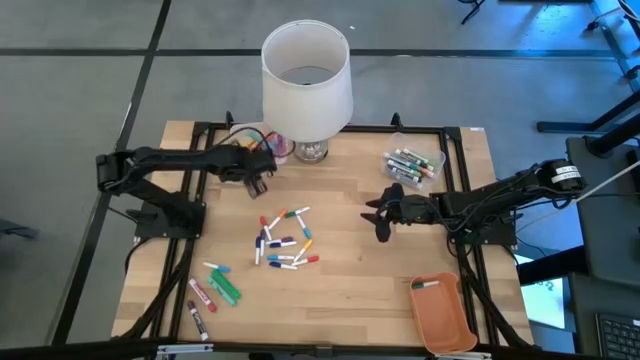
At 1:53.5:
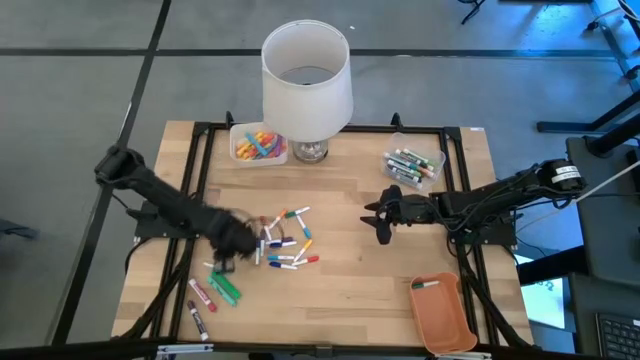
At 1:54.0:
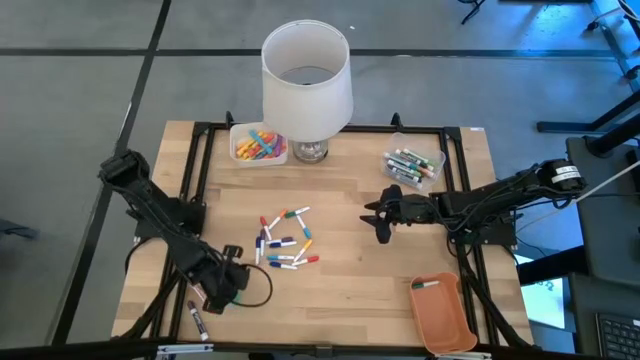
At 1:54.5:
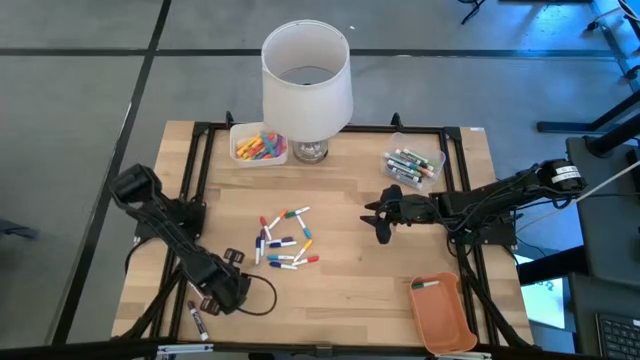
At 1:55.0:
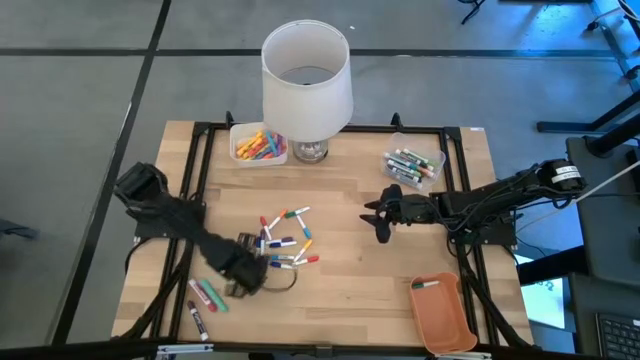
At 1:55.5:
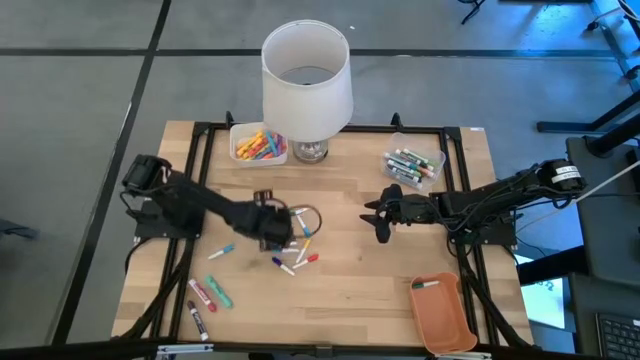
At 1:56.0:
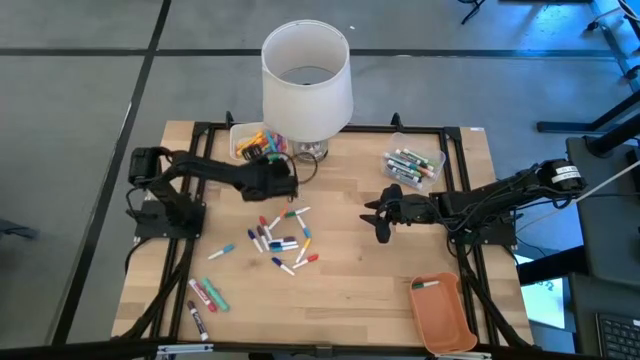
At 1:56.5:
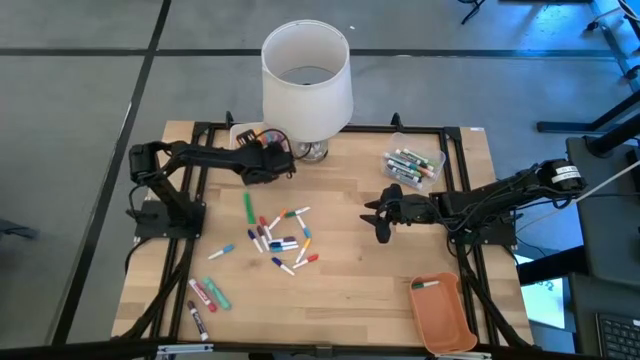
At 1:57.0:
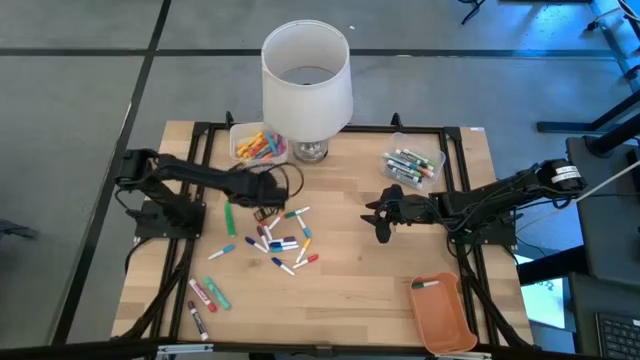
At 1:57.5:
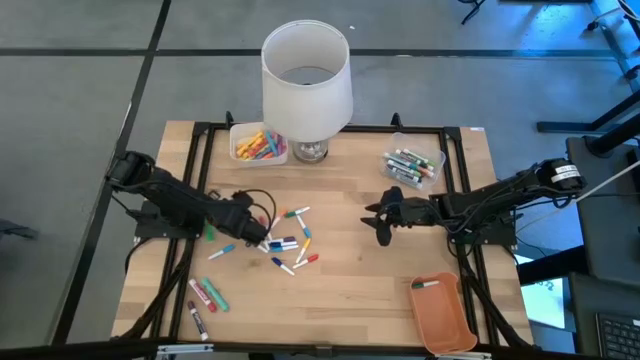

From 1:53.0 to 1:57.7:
Task: Pick & Place Markers
Put the green highlighter into the white bin

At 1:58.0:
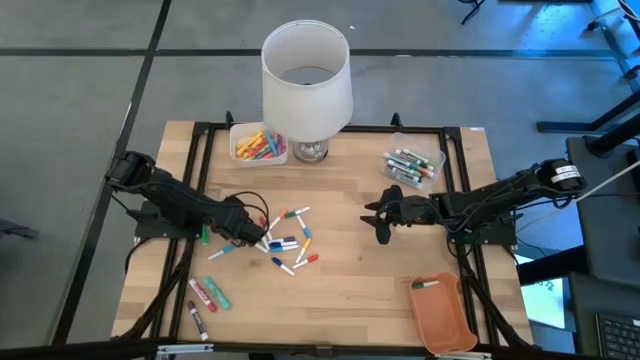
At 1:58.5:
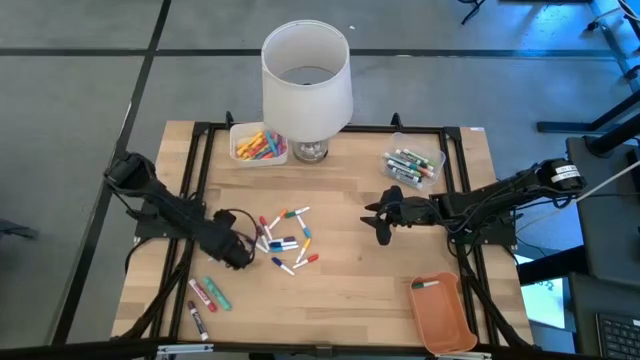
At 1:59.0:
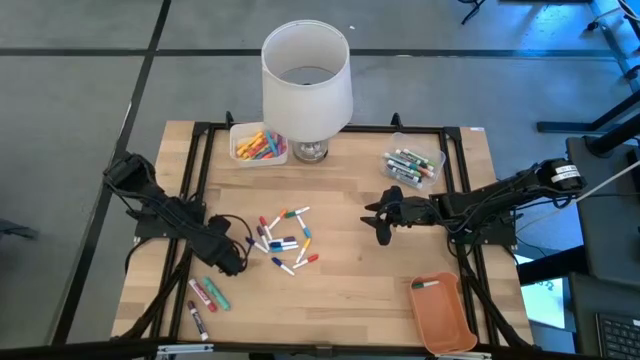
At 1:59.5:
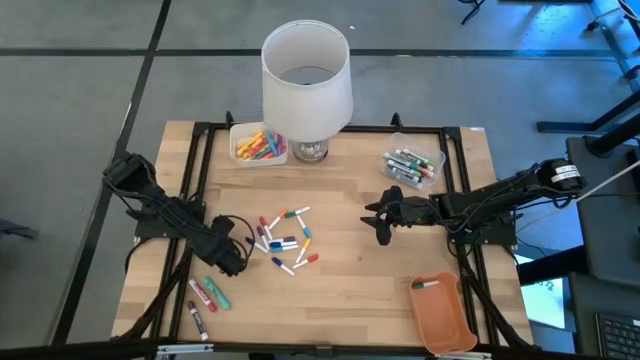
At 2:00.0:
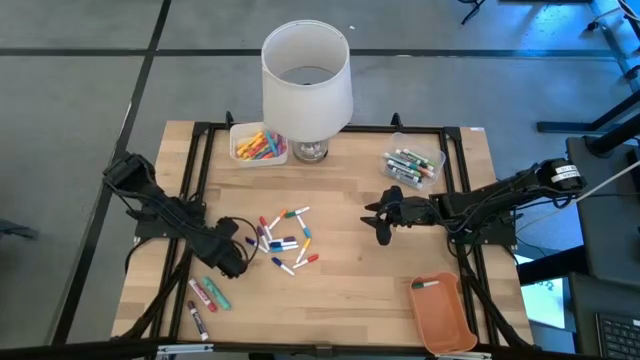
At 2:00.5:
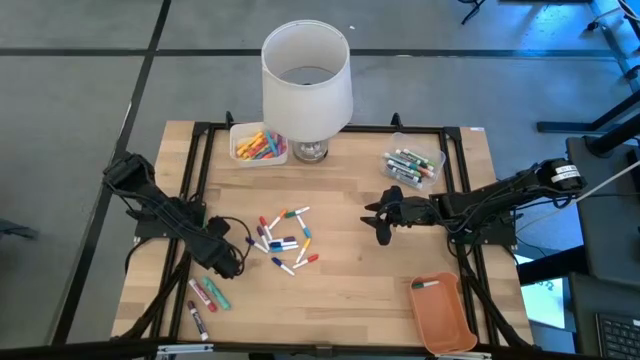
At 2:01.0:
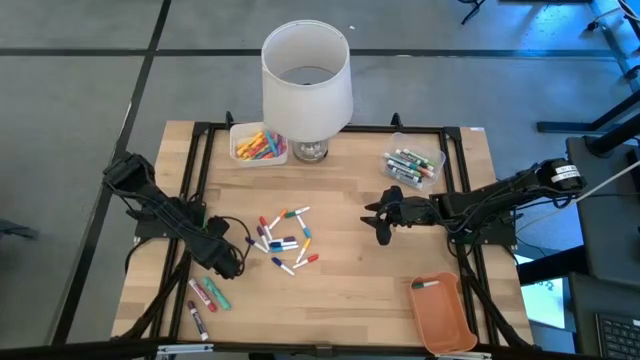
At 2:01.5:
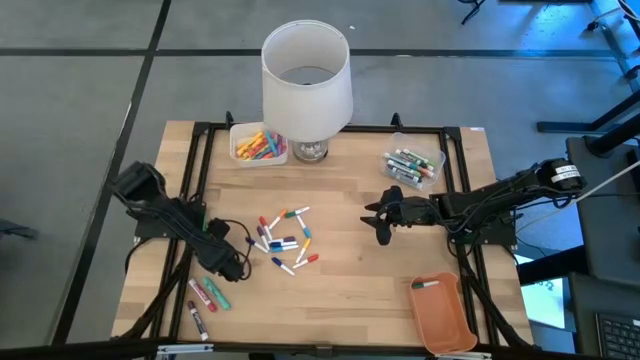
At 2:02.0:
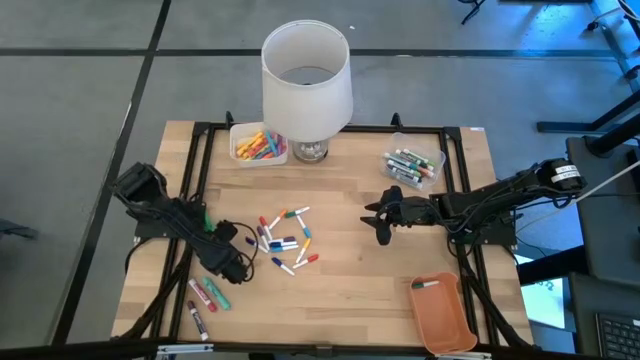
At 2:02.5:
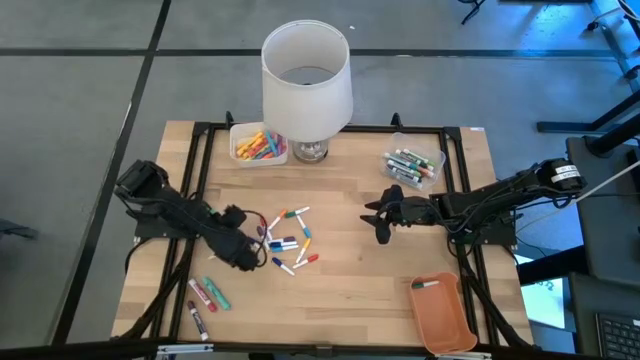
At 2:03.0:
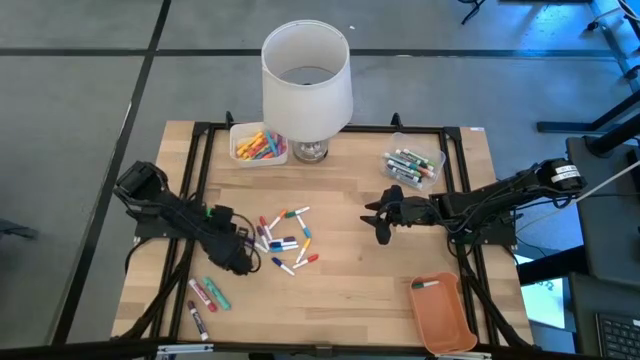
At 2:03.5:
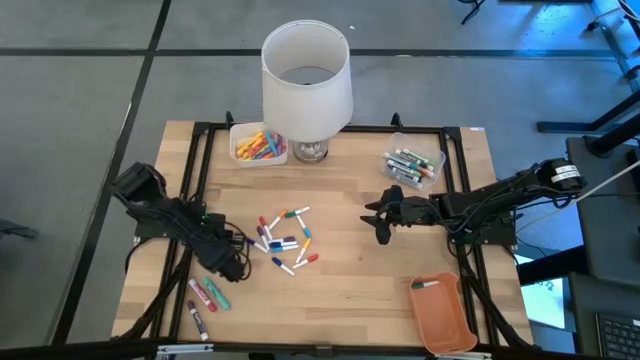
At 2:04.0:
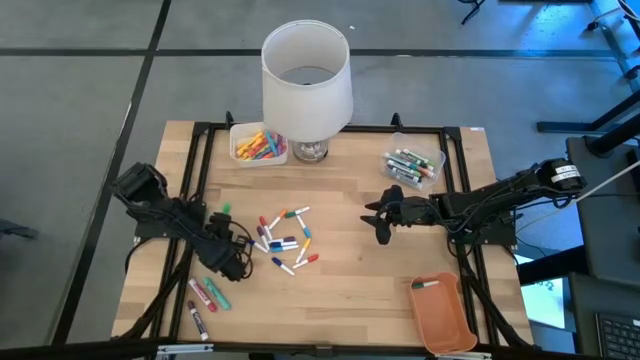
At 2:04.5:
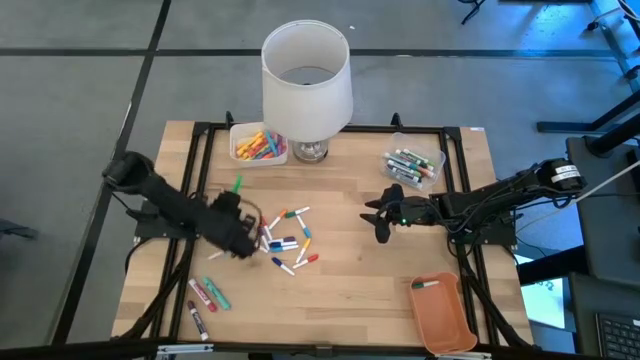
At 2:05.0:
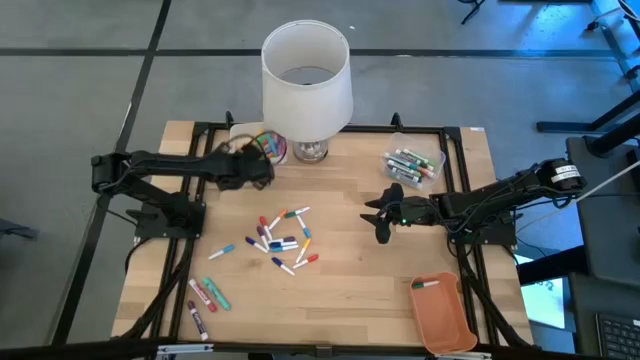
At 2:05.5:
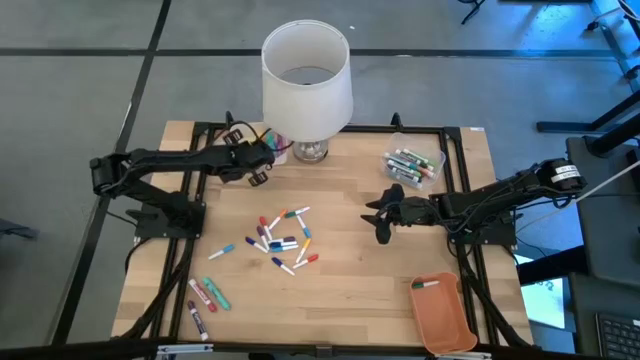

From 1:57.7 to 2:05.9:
Put the green highlighter into the white bin

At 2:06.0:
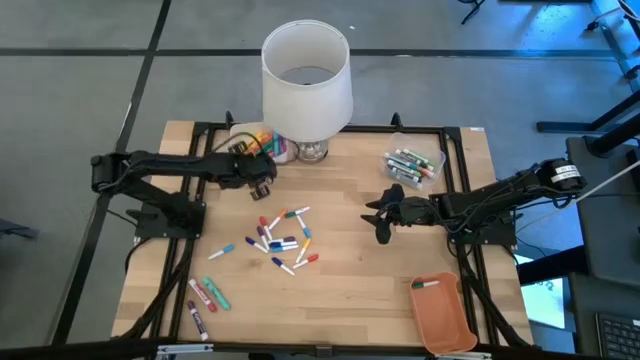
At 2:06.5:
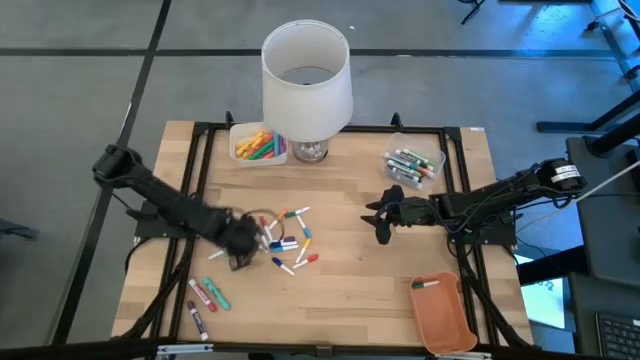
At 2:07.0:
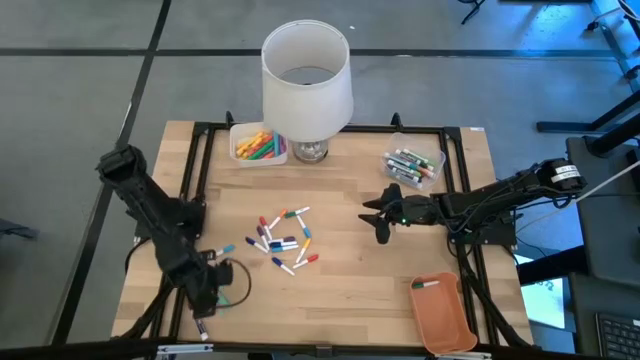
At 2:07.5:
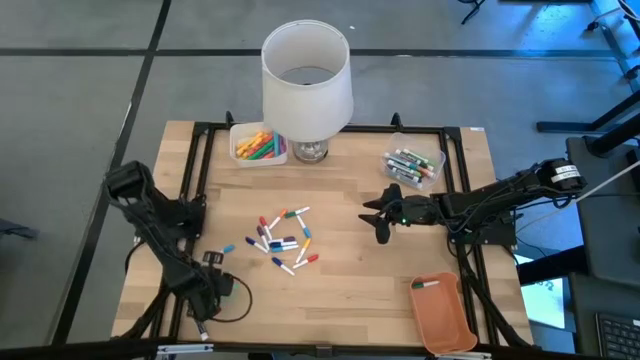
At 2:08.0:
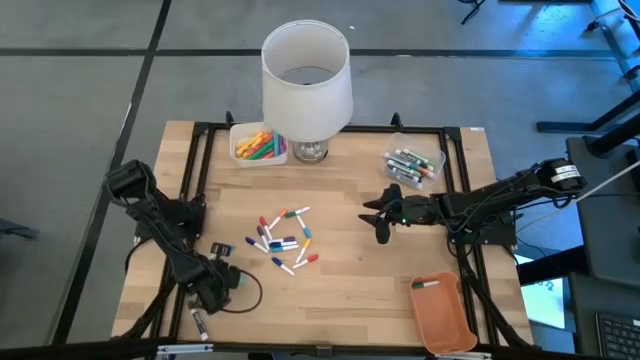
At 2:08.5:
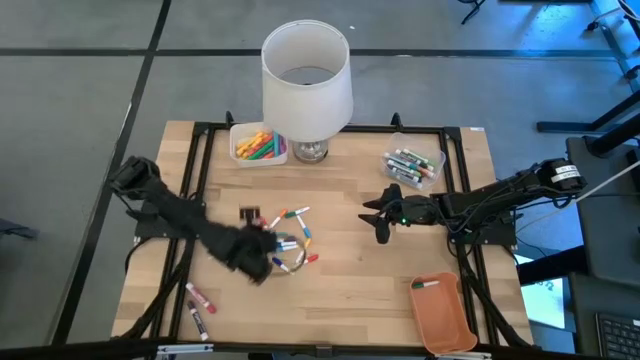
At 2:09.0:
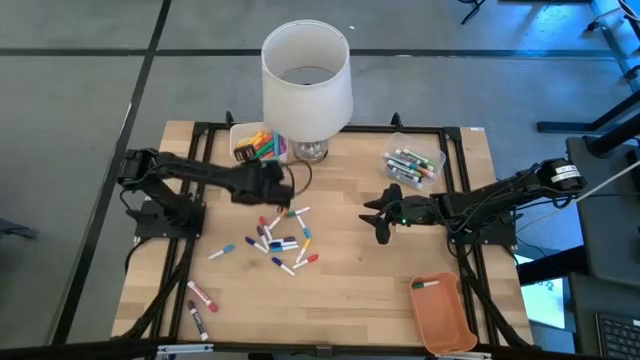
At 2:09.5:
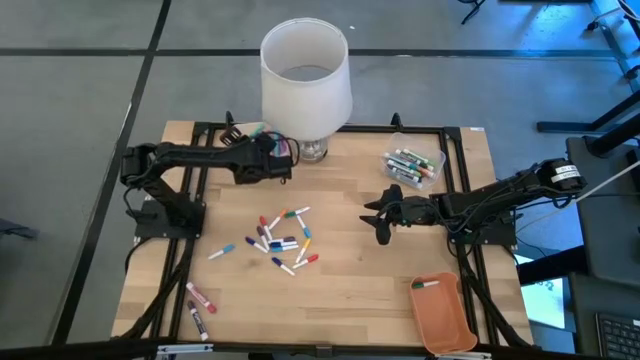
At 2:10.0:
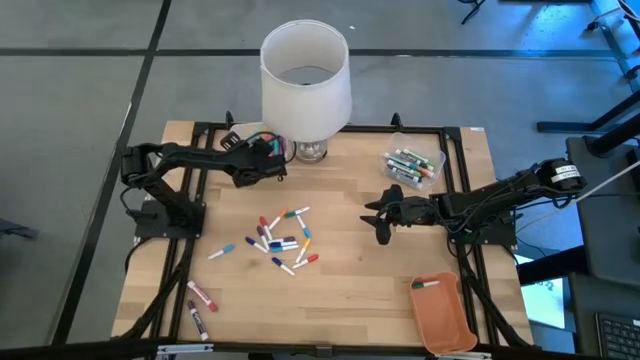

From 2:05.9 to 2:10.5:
Put the light blue highlighter into the white bin

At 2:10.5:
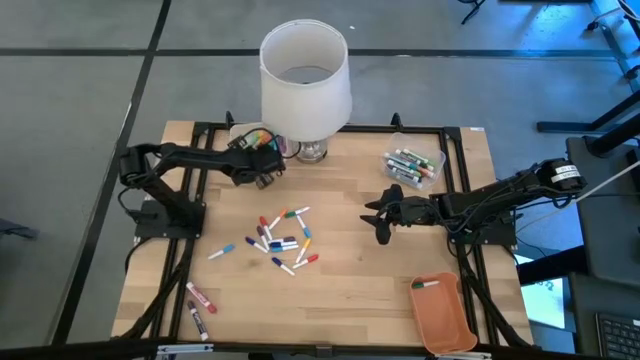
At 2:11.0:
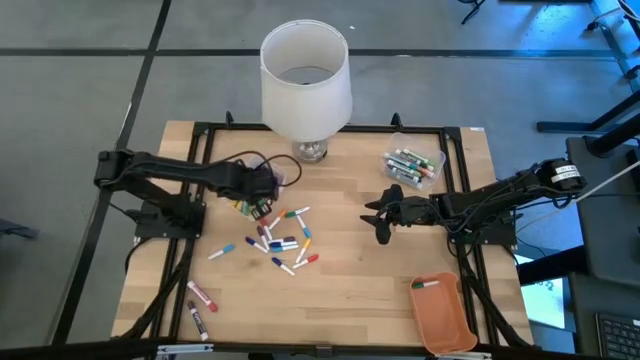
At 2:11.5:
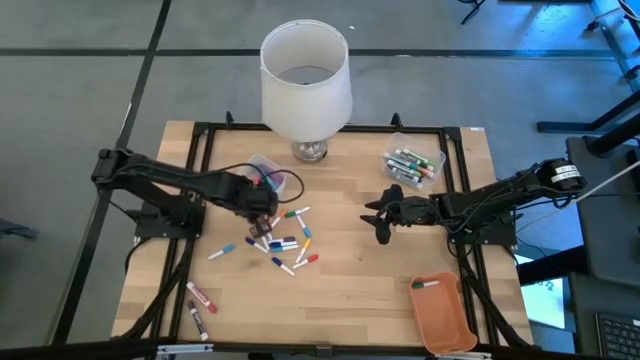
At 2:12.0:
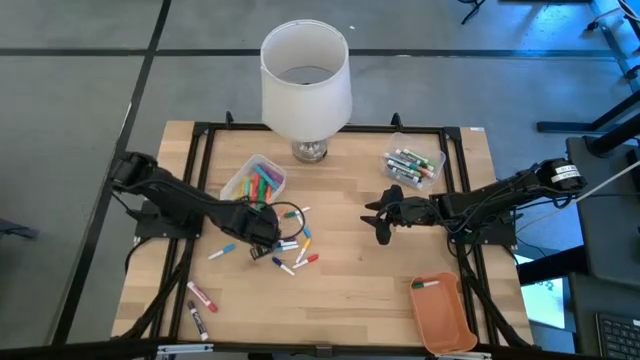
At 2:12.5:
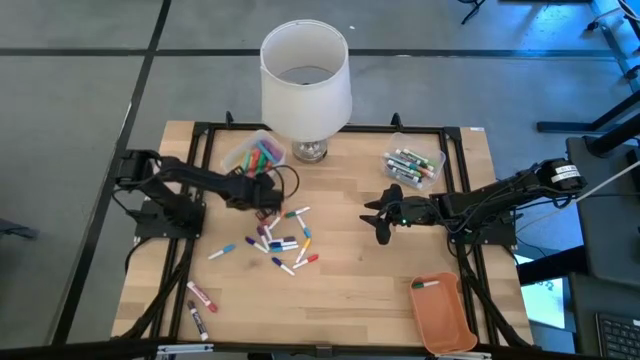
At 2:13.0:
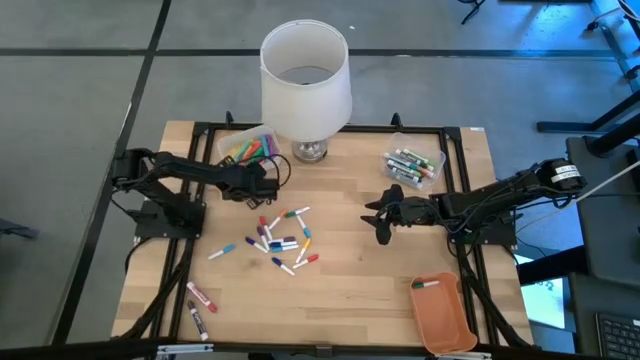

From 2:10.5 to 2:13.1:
Adjust the white bin
